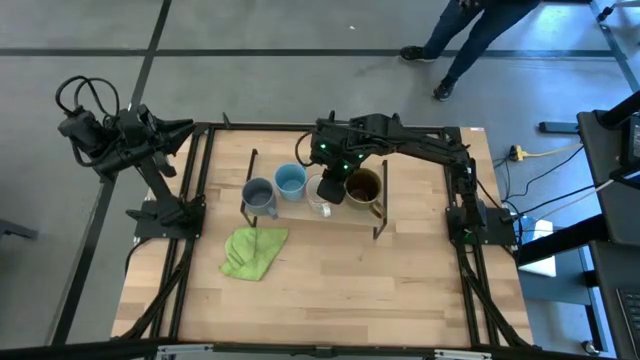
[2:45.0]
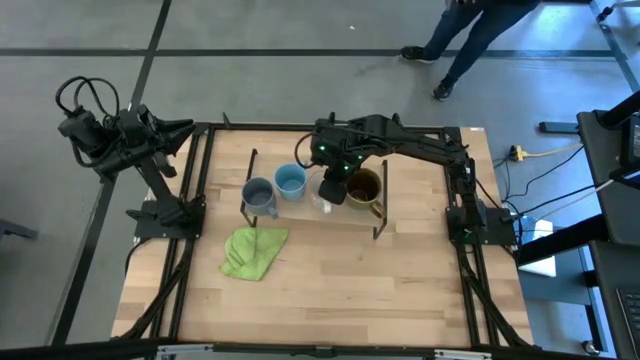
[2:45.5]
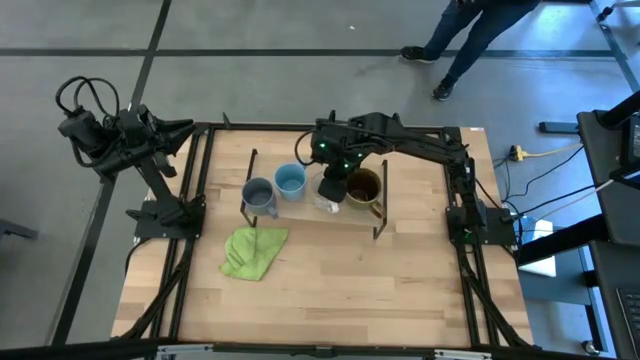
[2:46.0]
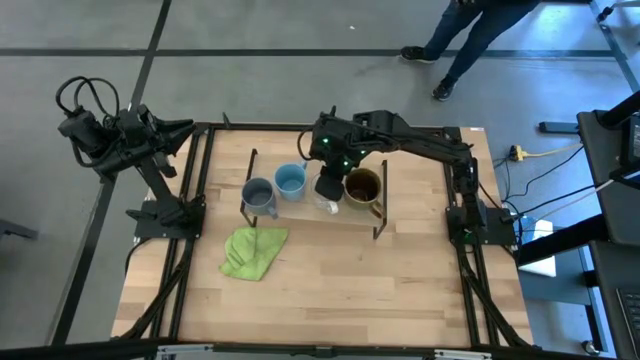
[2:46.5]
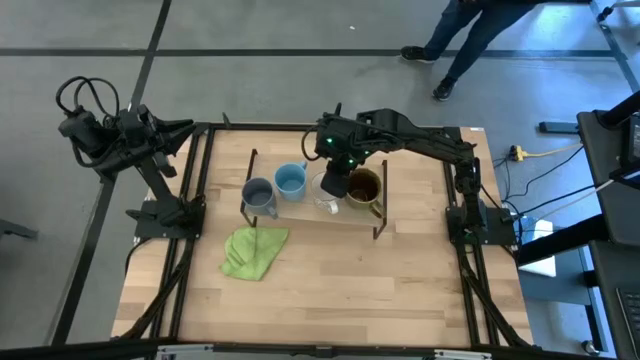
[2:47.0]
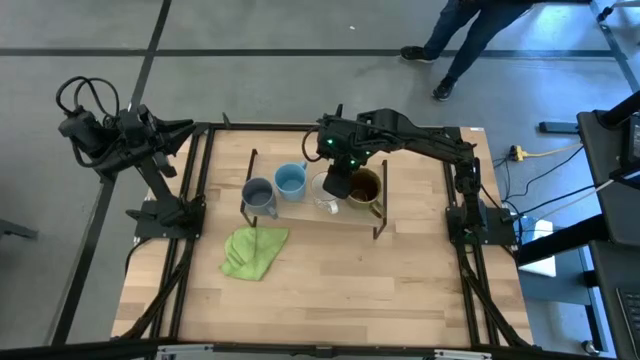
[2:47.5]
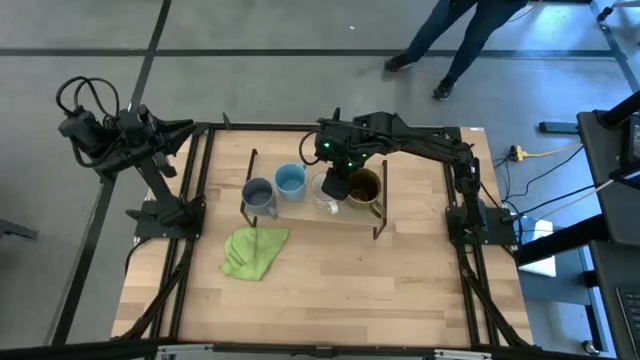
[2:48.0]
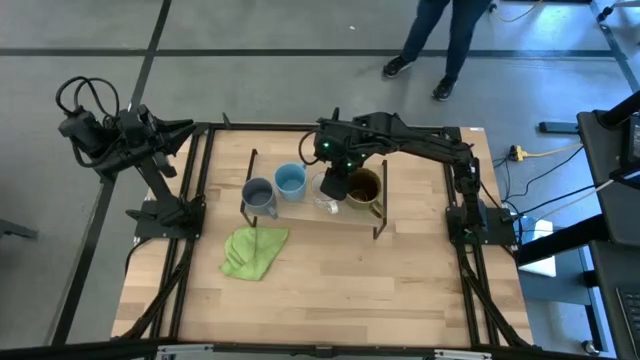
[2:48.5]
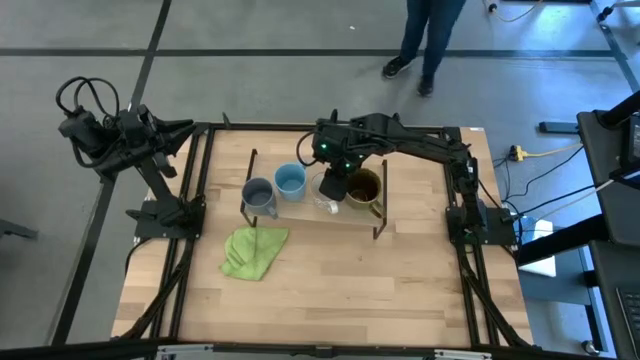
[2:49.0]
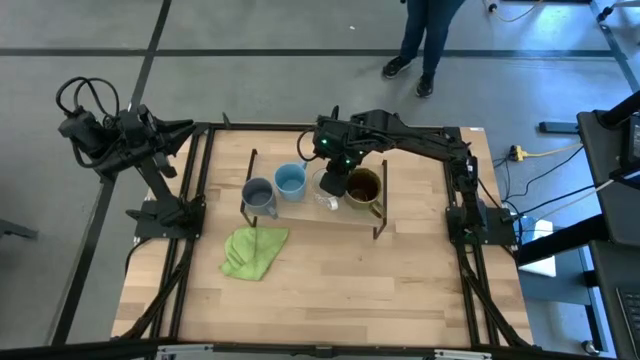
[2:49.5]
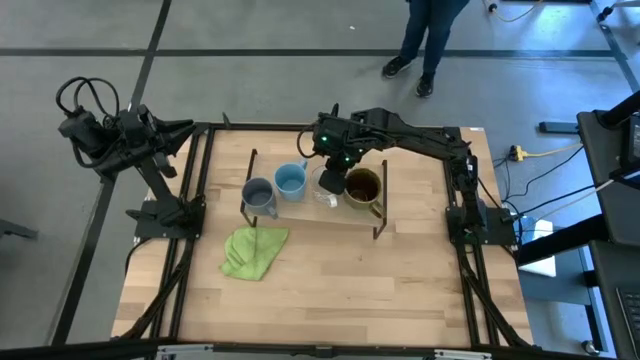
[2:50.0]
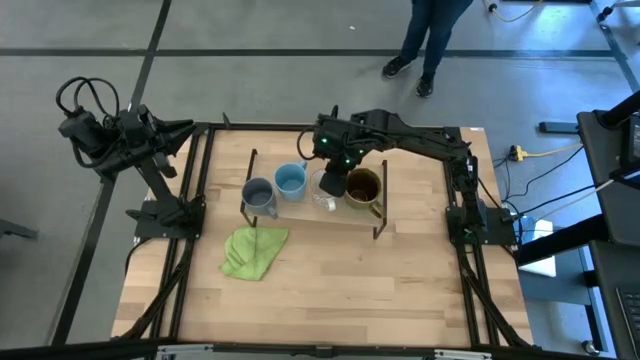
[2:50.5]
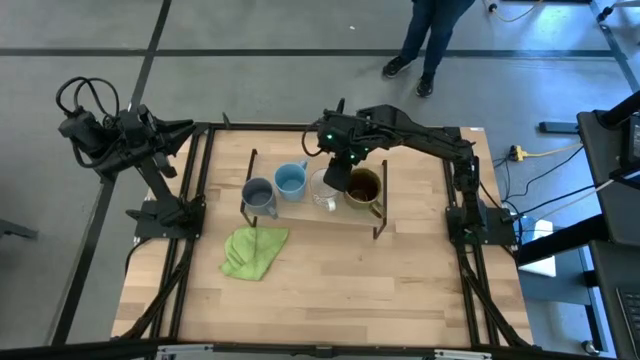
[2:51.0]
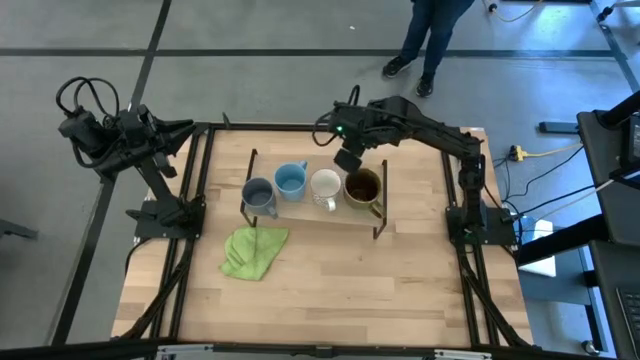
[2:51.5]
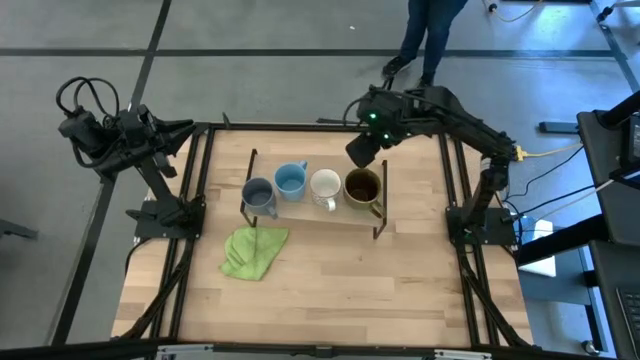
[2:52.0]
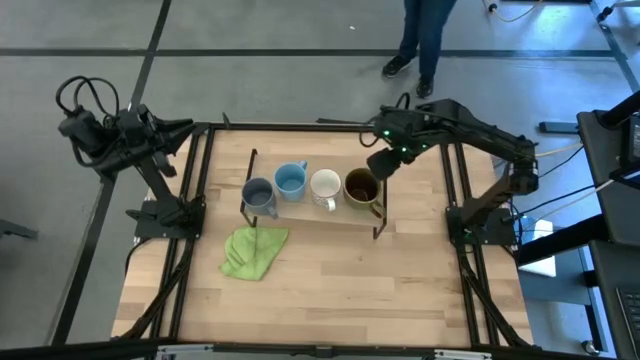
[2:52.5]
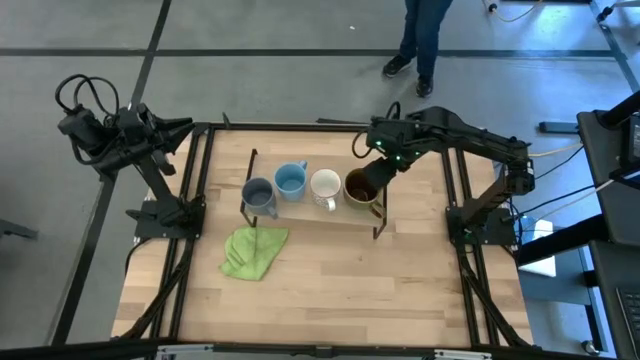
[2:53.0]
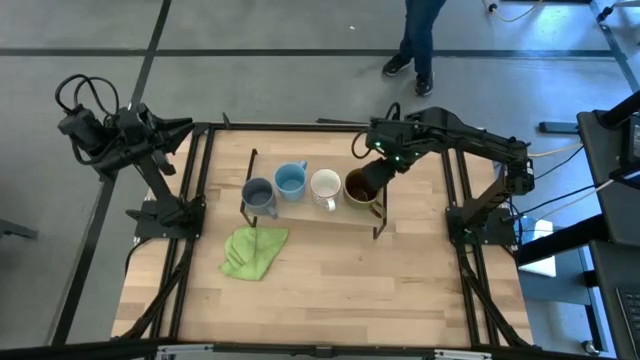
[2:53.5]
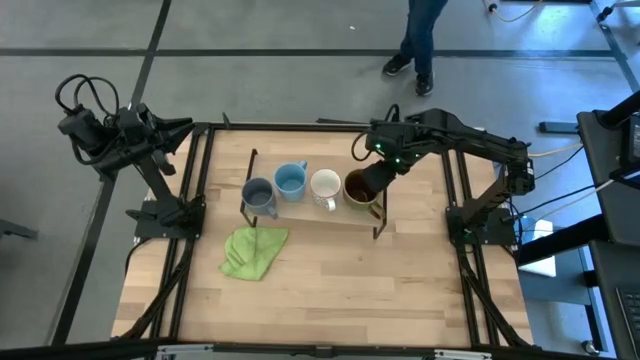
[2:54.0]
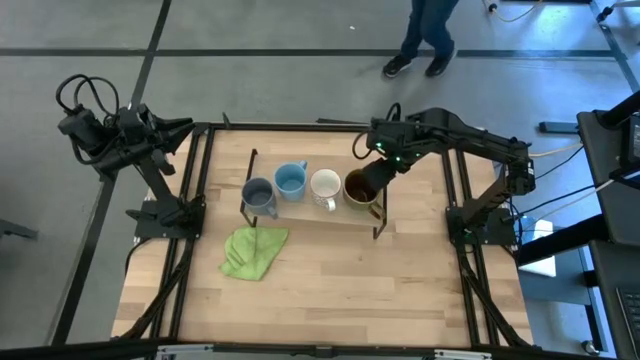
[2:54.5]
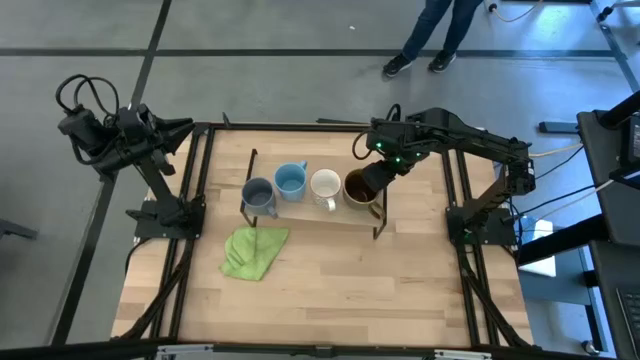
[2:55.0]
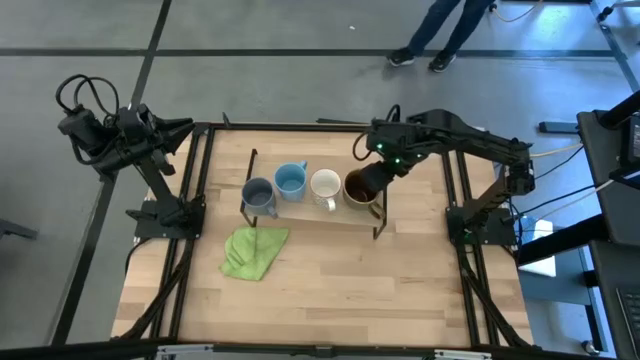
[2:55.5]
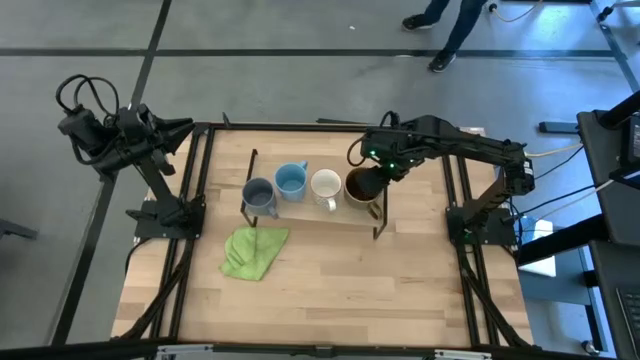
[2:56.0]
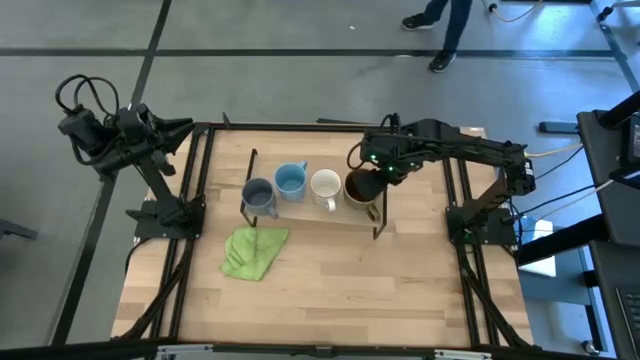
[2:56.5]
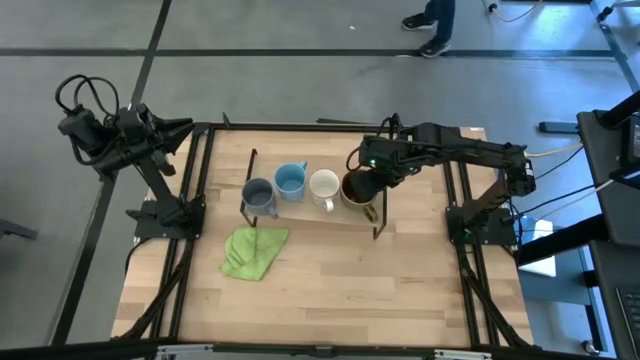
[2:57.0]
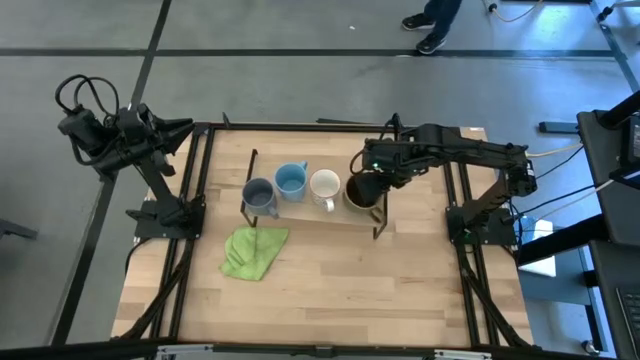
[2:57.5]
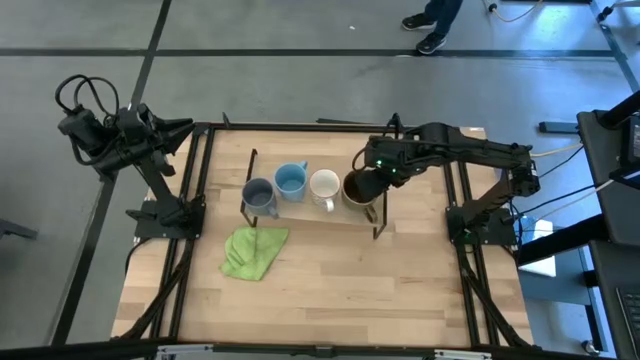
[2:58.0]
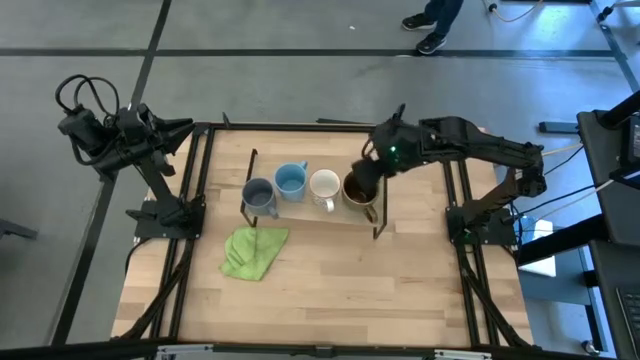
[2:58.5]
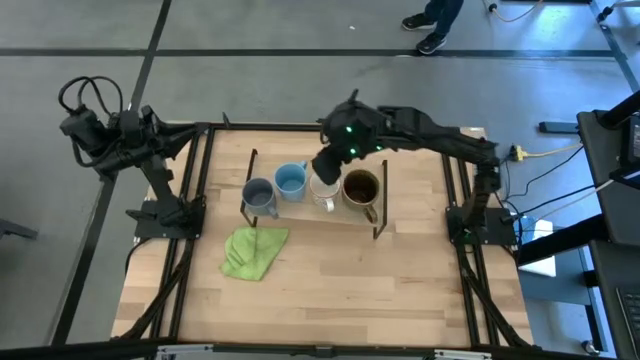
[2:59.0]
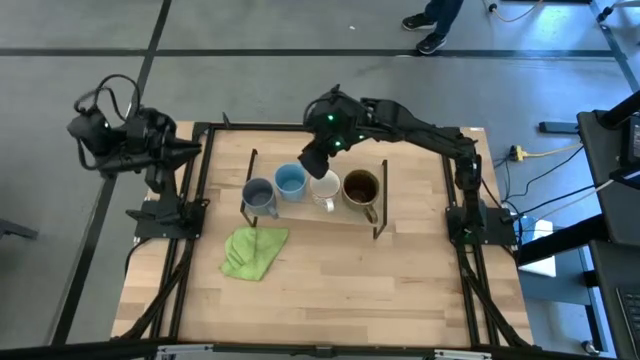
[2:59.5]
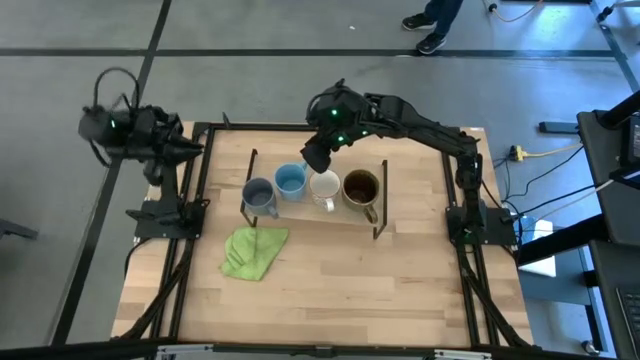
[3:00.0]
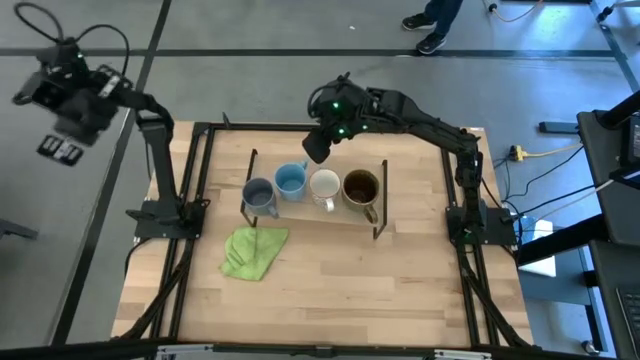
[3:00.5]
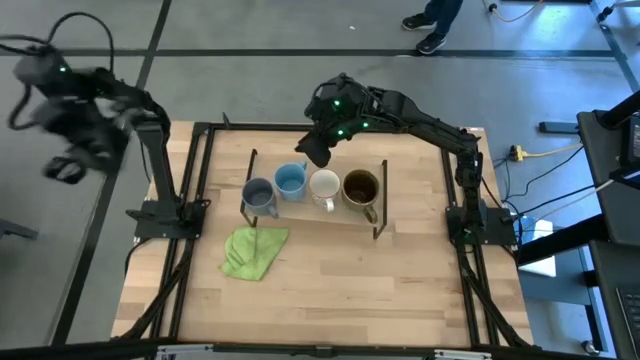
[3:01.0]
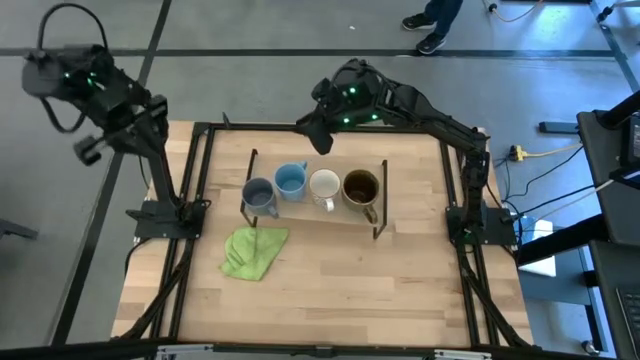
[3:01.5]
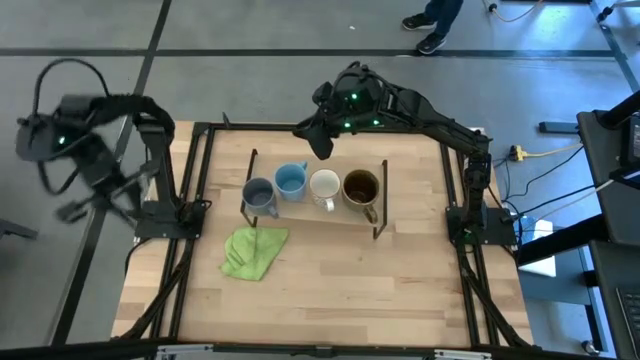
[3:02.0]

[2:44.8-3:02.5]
Task: Stack small to large cups/mugs on shelf
Adjust the mugs on the shelf
